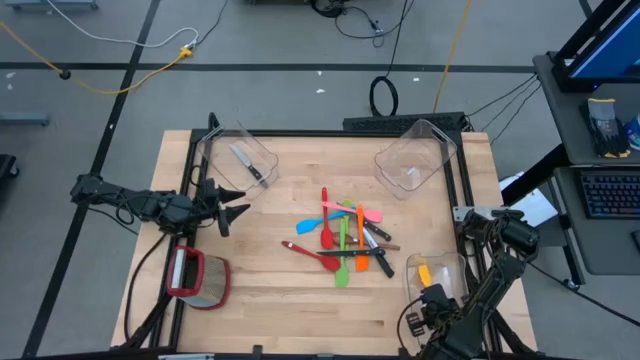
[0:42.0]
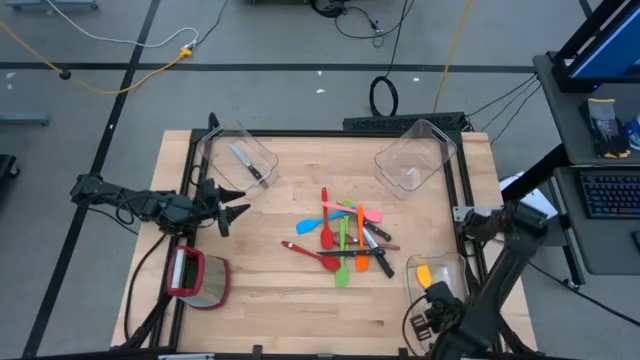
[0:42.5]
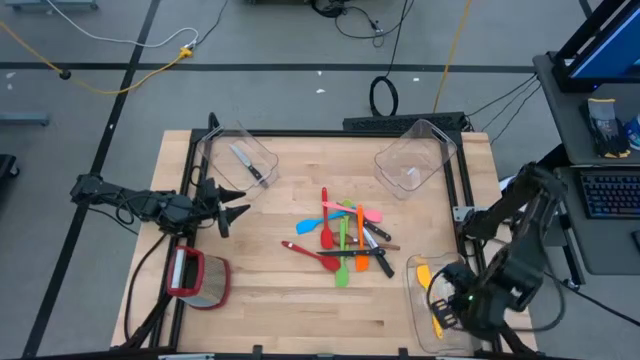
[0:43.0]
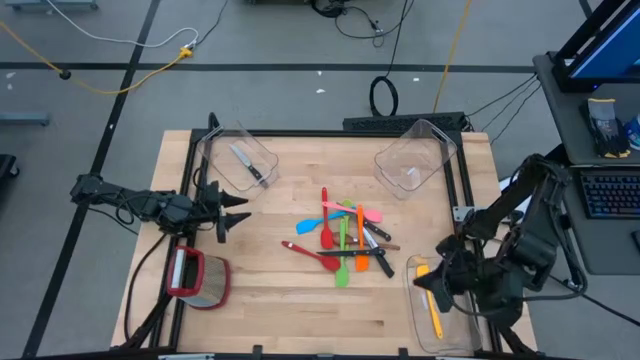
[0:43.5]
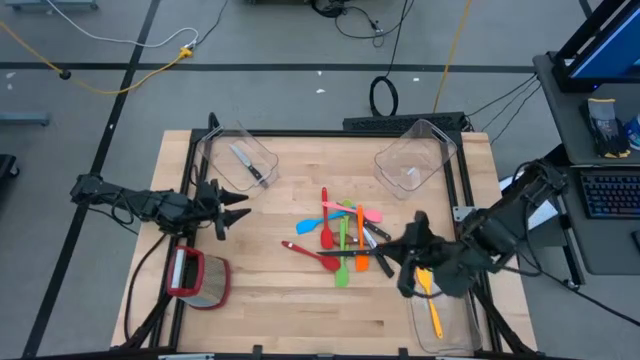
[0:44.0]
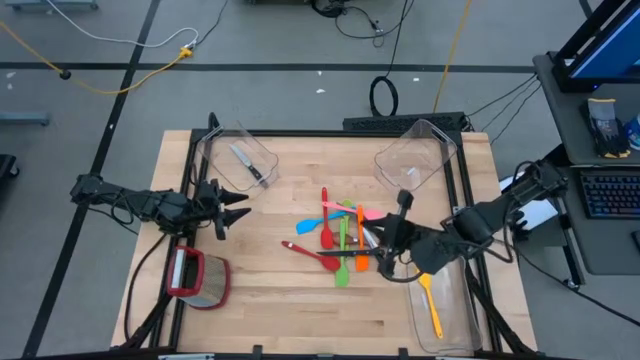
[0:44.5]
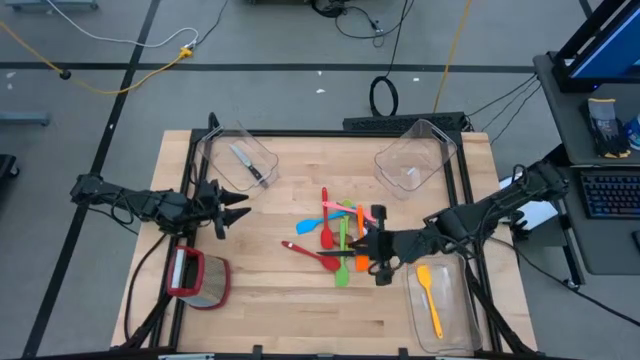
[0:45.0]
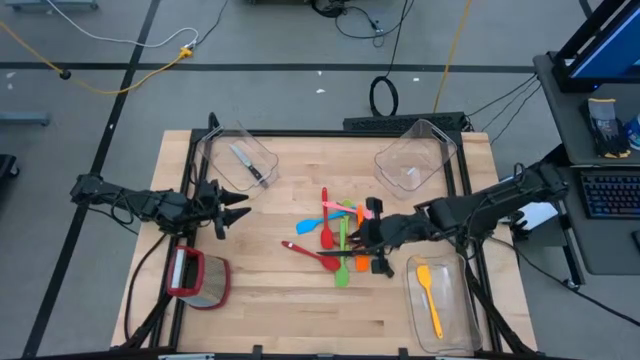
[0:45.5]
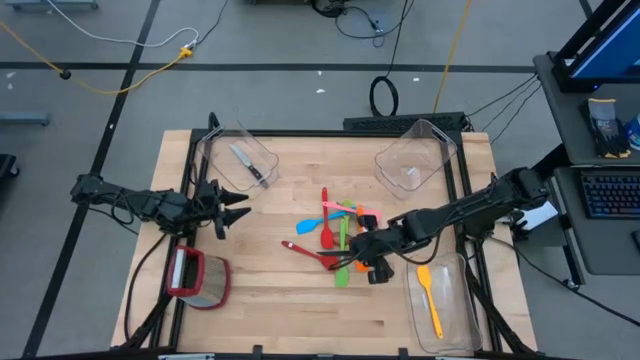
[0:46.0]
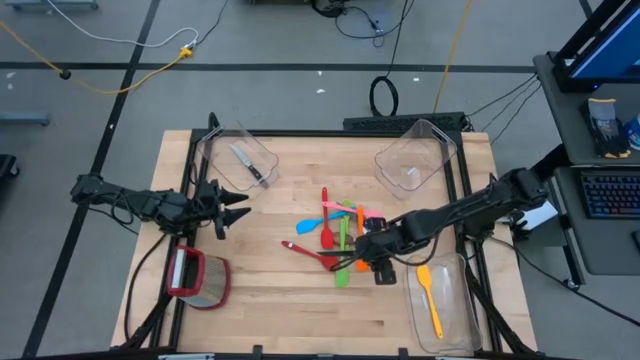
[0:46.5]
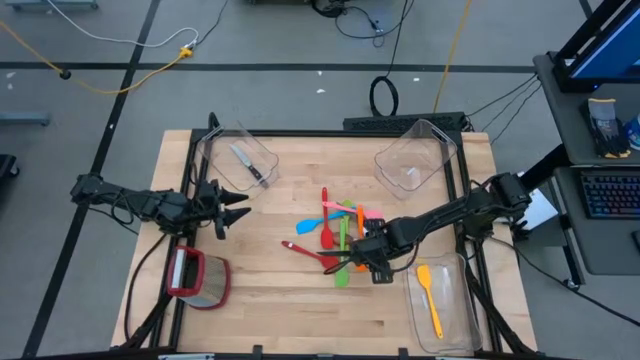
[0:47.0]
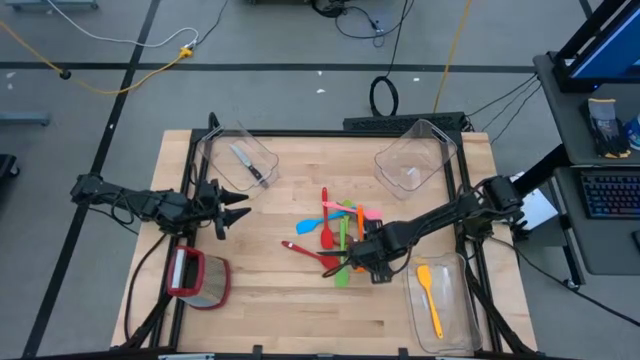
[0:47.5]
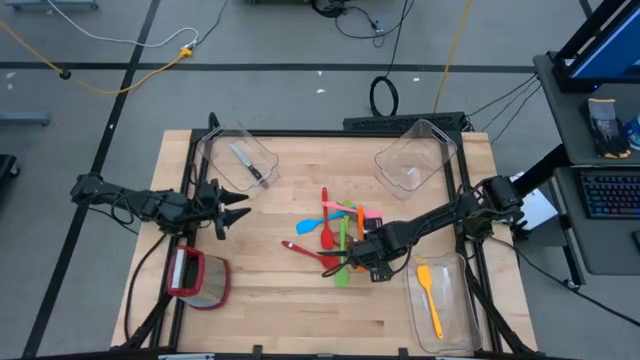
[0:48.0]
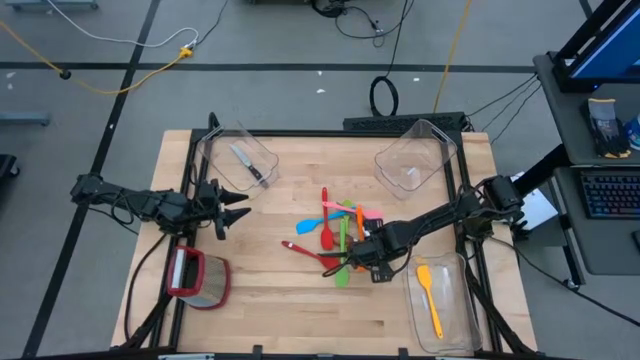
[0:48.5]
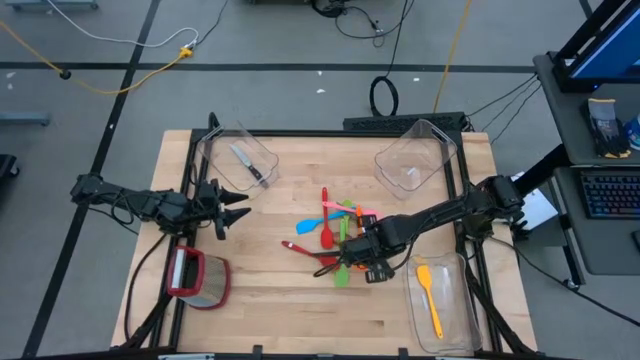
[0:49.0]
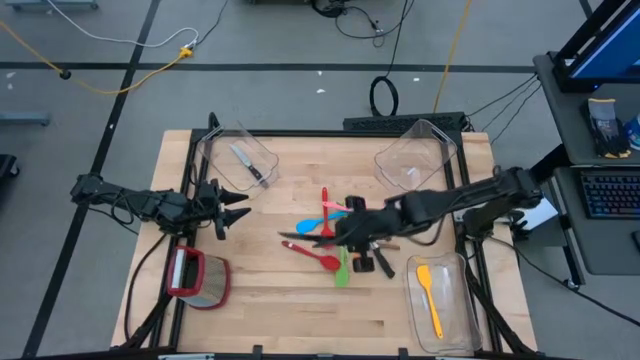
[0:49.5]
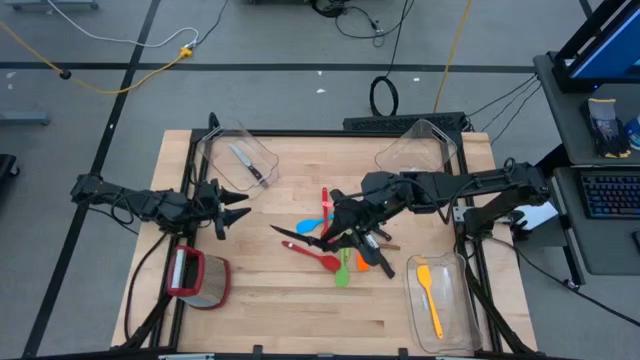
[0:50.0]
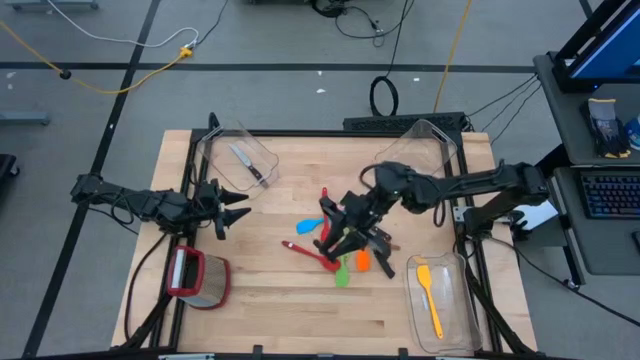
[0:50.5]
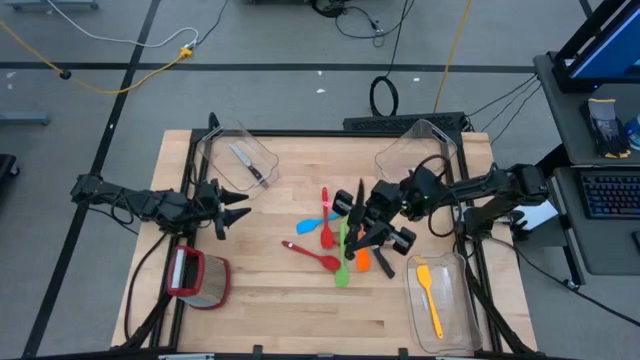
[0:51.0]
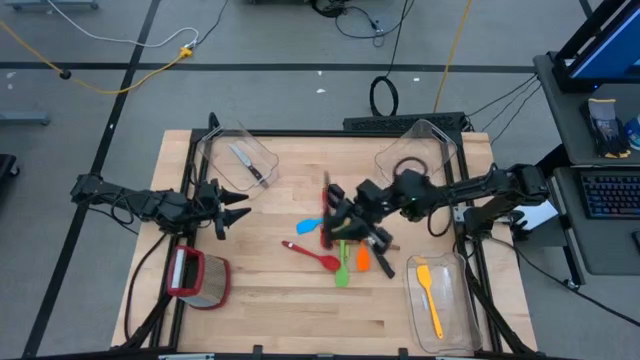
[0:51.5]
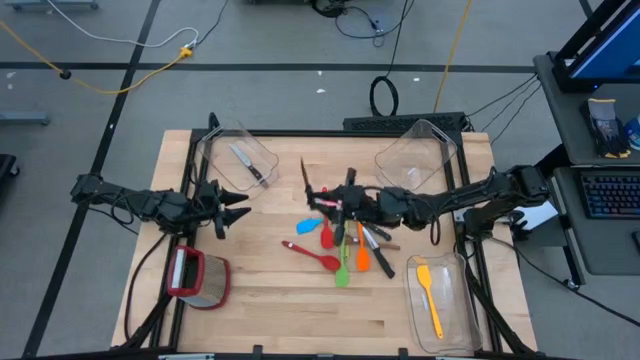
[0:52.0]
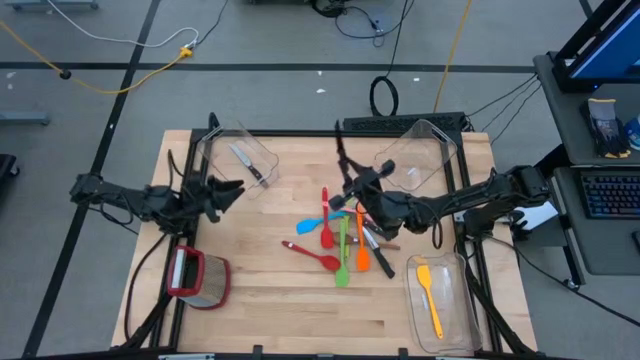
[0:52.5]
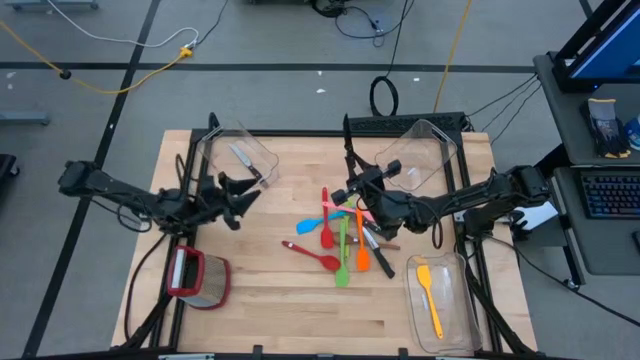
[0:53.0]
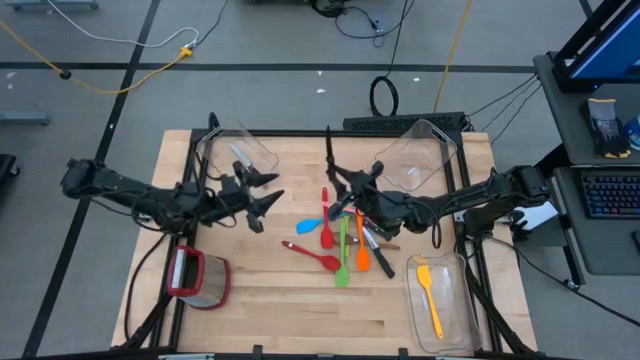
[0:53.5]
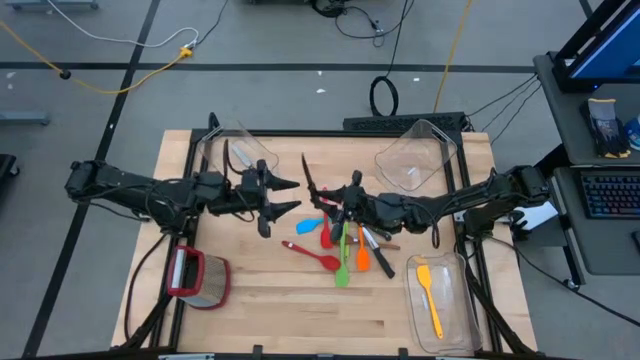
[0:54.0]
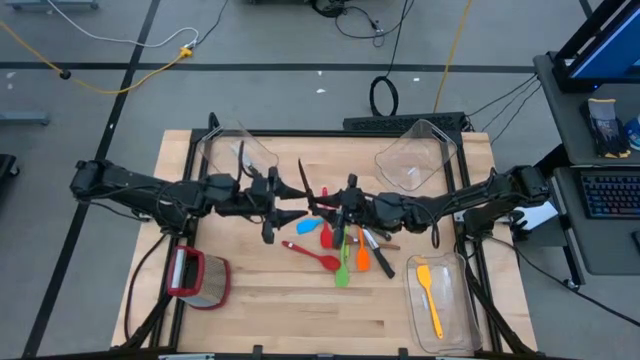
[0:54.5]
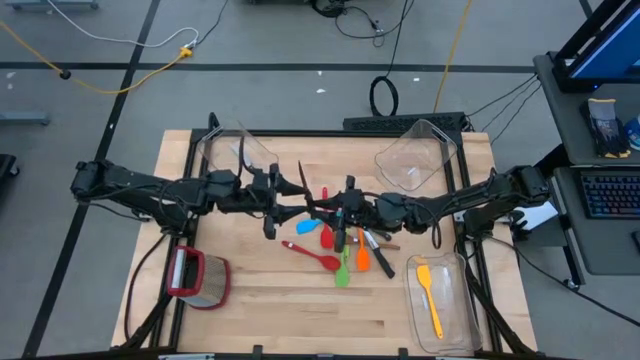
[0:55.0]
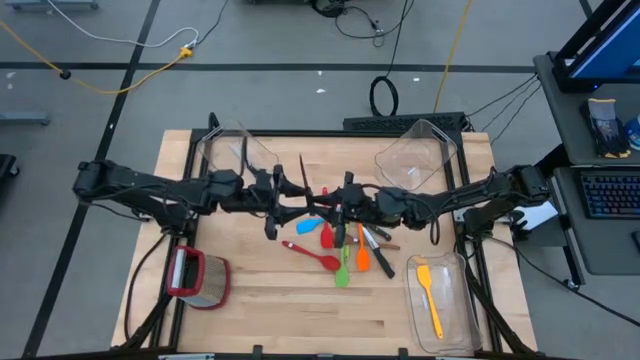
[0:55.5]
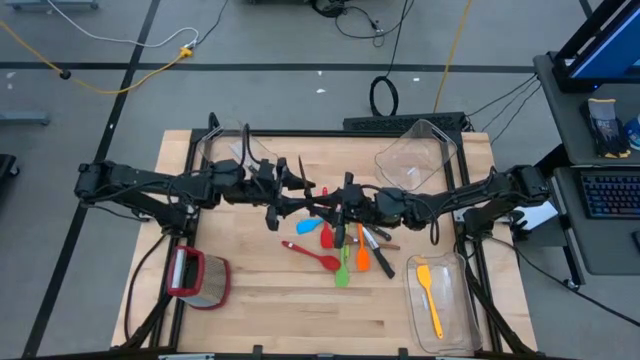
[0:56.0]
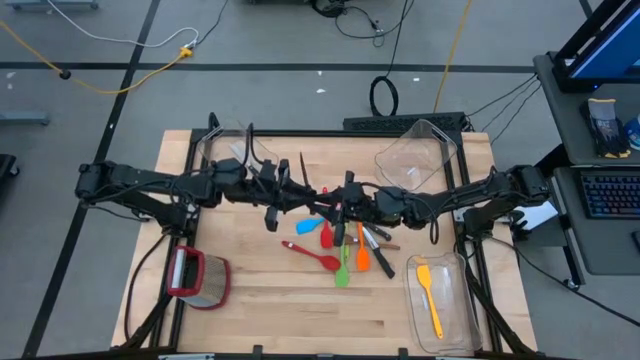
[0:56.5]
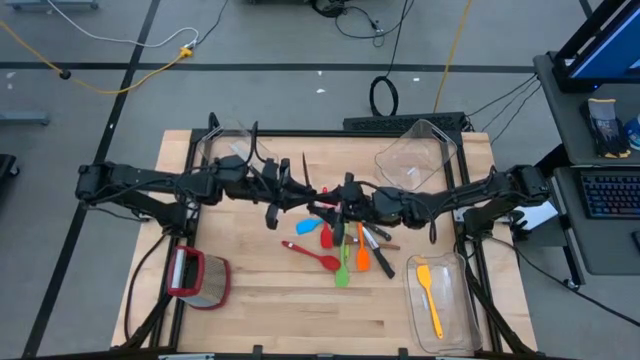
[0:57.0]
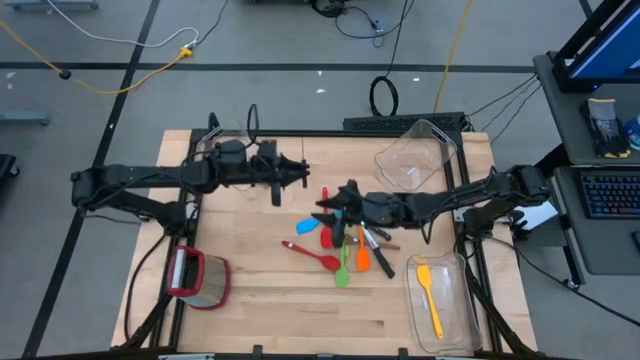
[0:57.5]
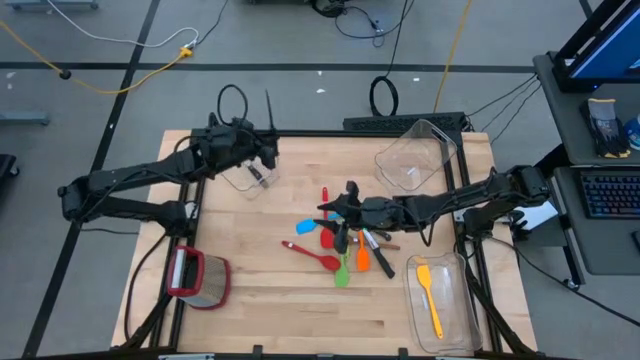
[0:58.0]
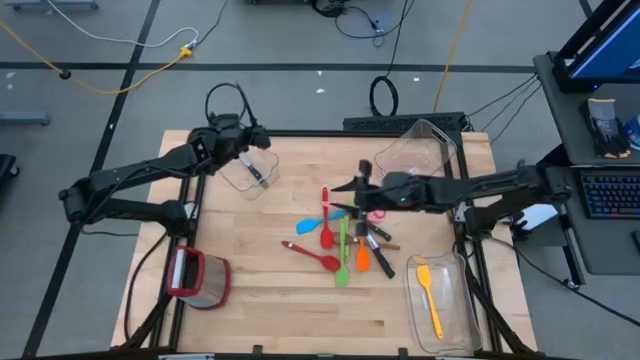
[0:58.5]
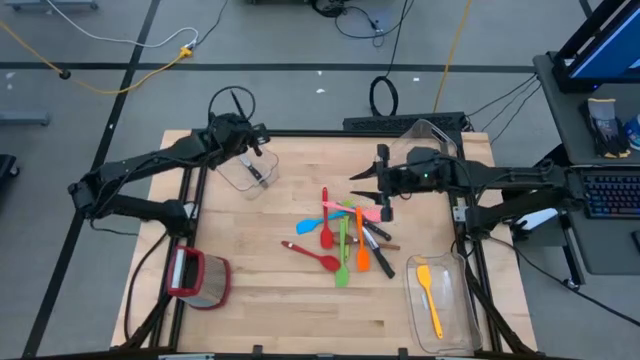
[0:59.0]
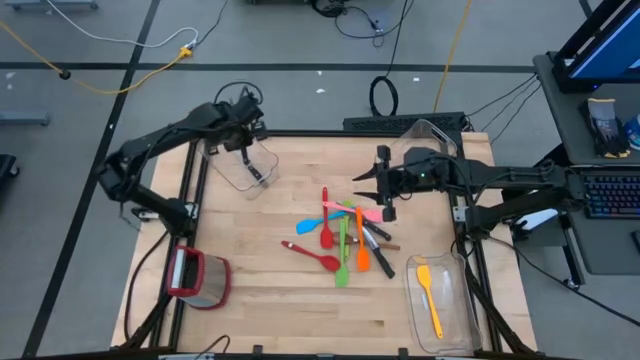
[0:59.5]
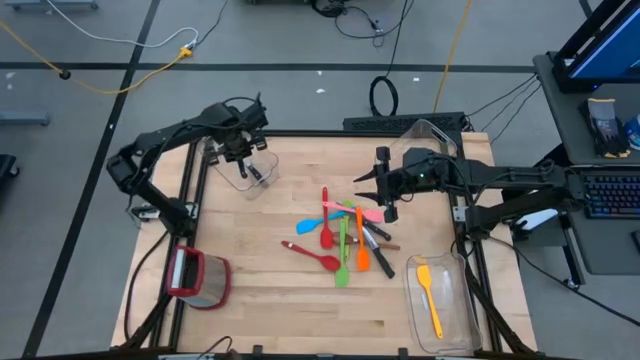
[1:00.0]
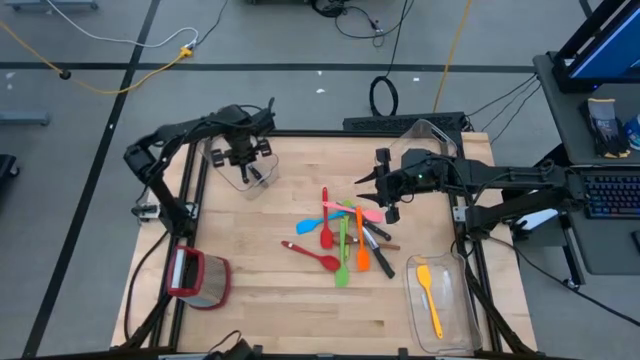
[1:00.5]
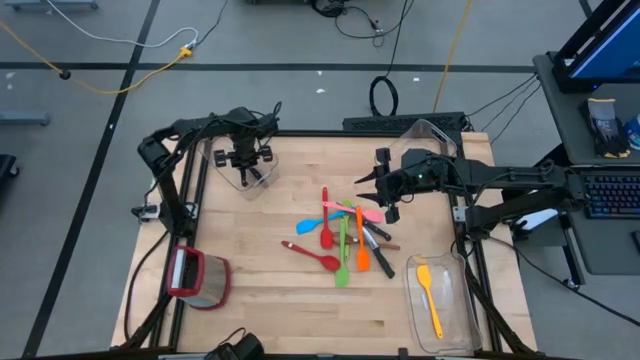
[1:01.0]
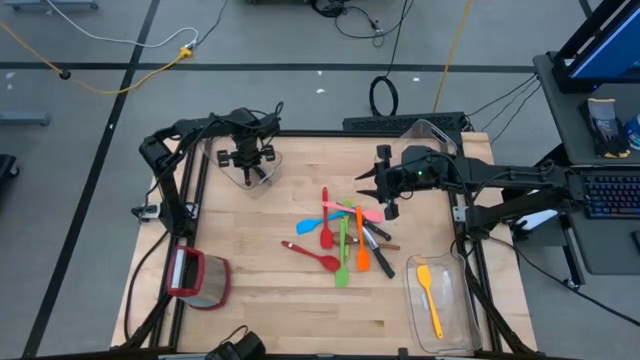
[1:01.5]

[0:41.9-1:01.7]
Task: Pick & Place Kitchen Items
Put the black kitchen knife into the top left transparent bin

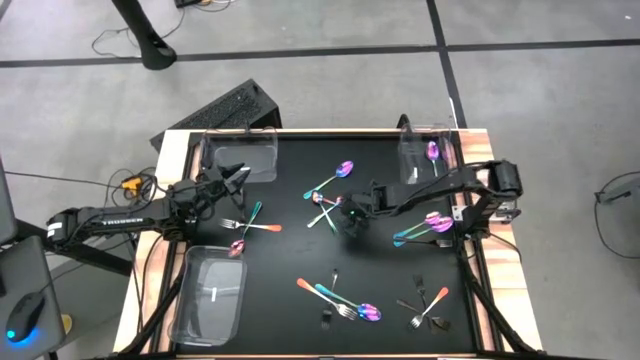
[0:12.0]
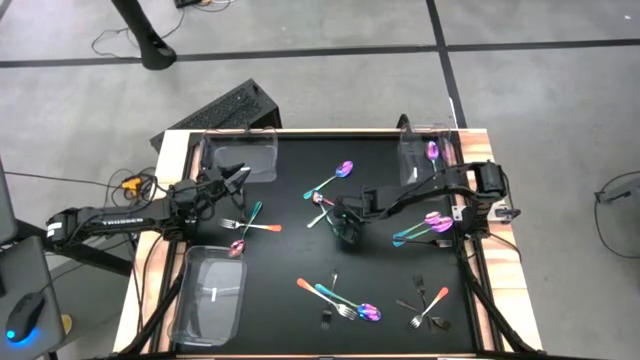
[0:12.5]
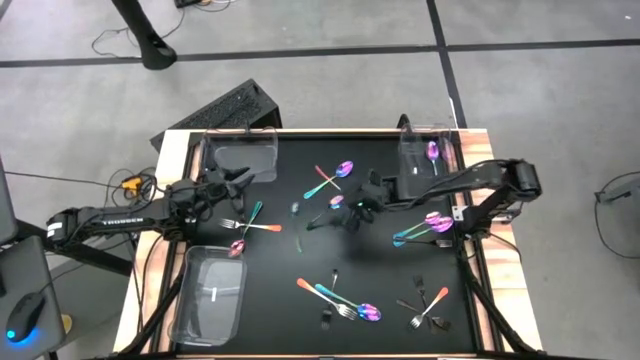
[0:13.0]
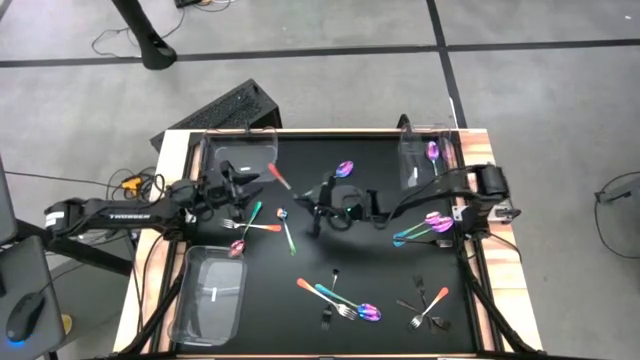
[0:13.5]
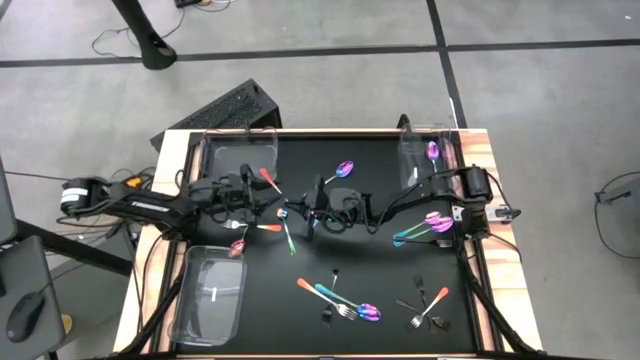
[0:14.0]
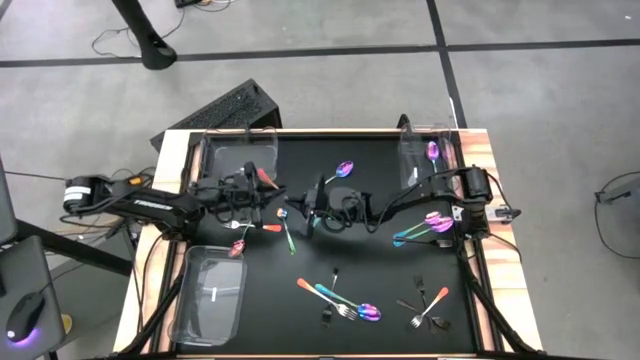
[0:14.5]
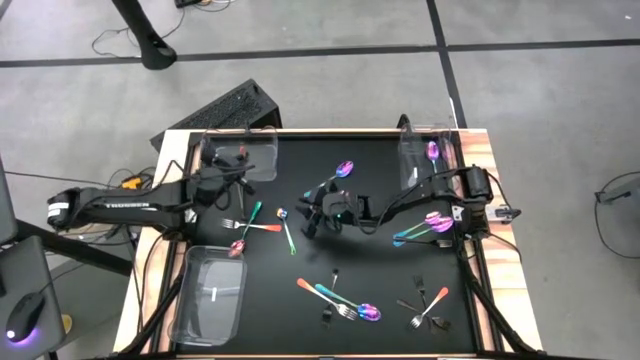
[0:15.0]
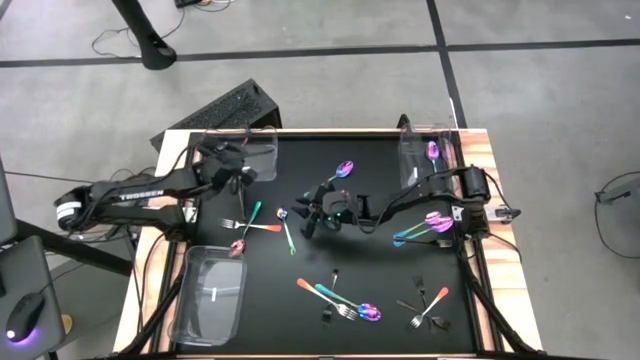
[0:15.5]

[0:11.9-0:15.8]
Task: Sort silverware by color (type)
Put the orange fork into the top left transparent bin
